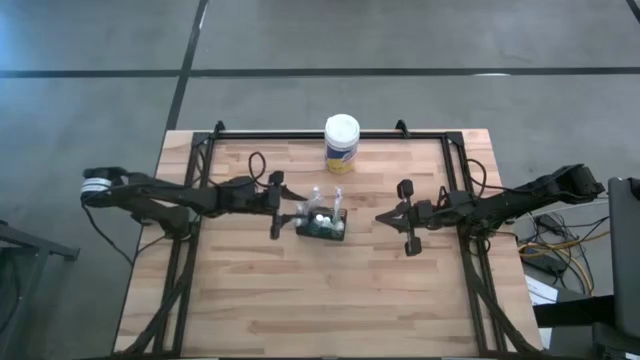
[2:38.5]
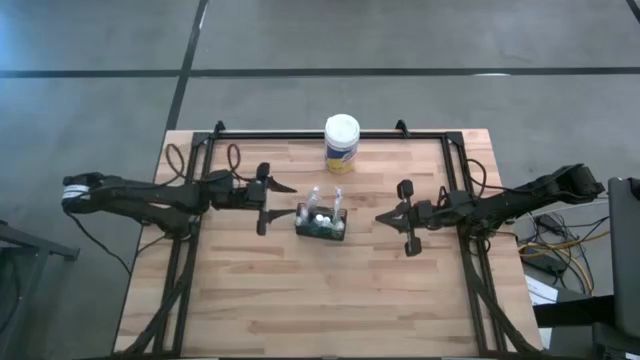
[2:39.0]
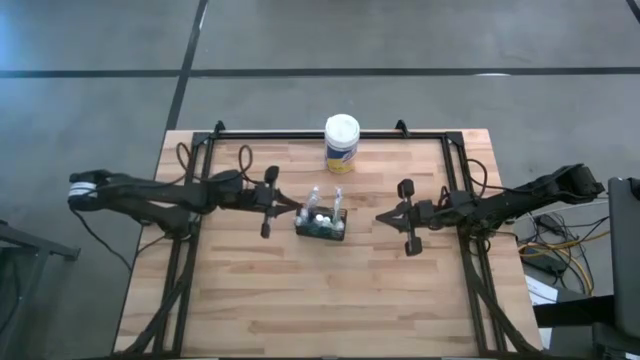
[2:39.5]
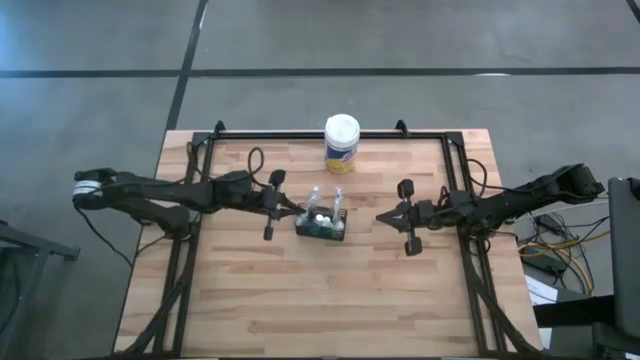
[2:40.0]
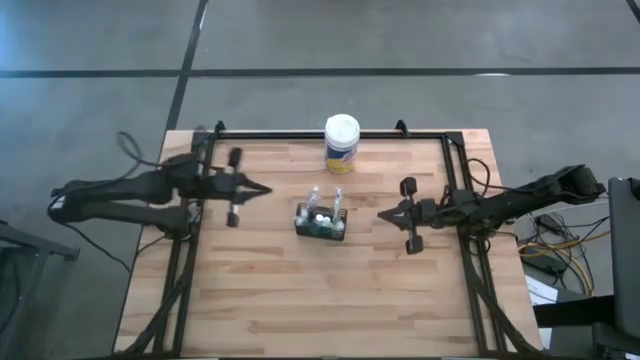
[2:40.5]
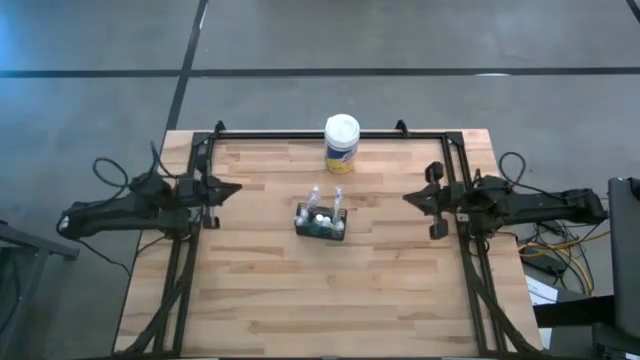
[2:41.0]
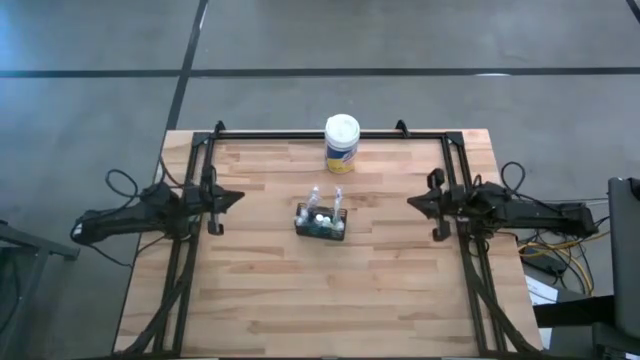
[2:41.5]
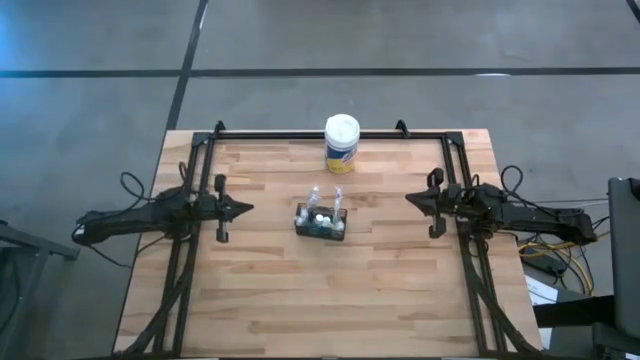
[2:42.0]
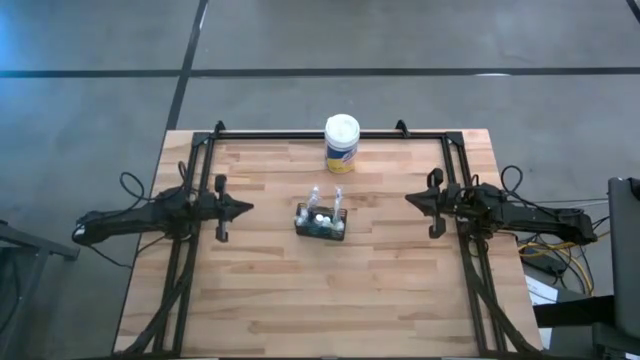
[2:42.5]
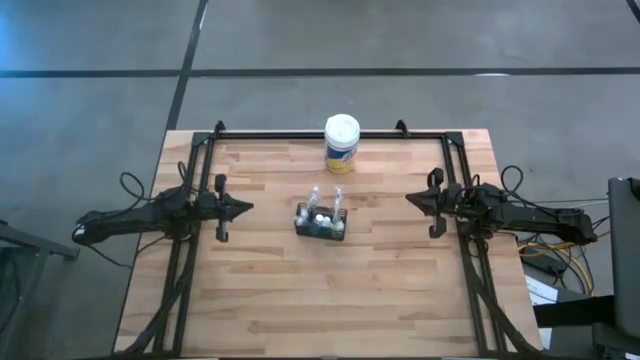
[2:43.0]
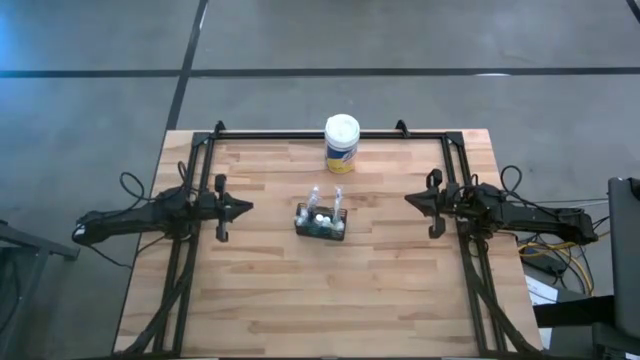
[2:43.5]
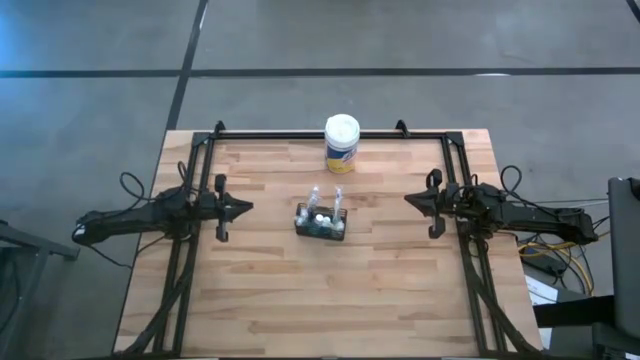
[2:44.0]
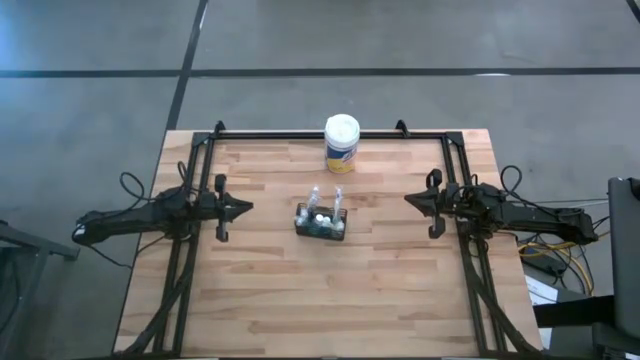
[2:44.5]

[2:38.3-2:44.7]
Task: Pick & Place toothbrushing station
Return to Home Position

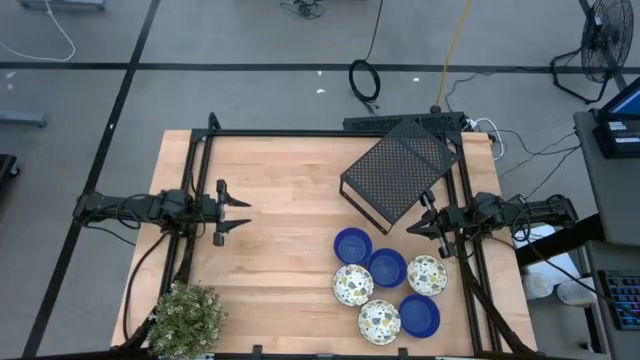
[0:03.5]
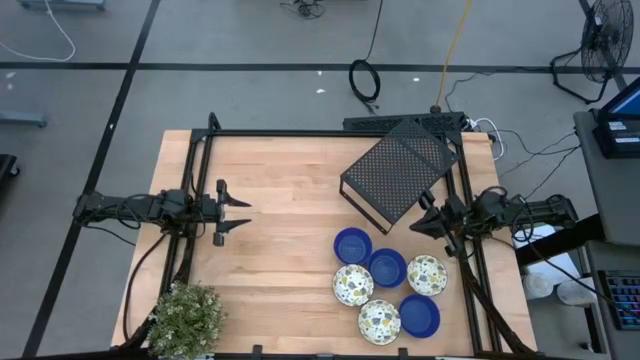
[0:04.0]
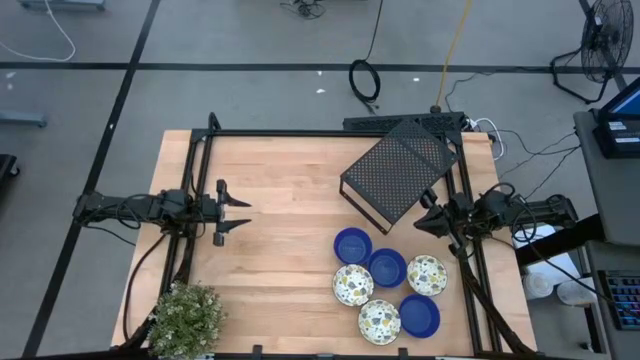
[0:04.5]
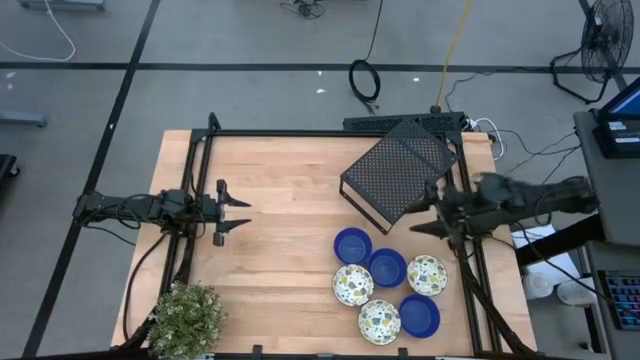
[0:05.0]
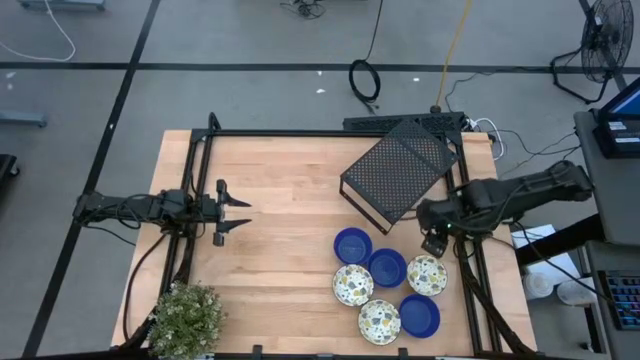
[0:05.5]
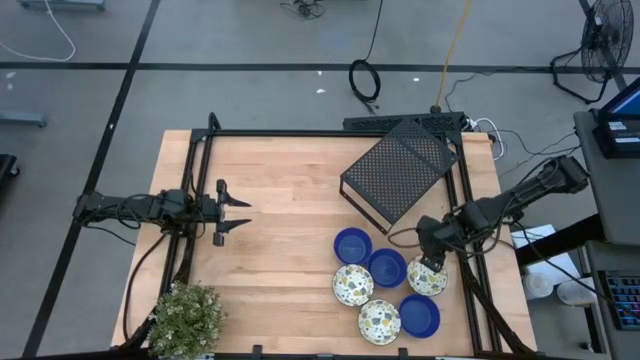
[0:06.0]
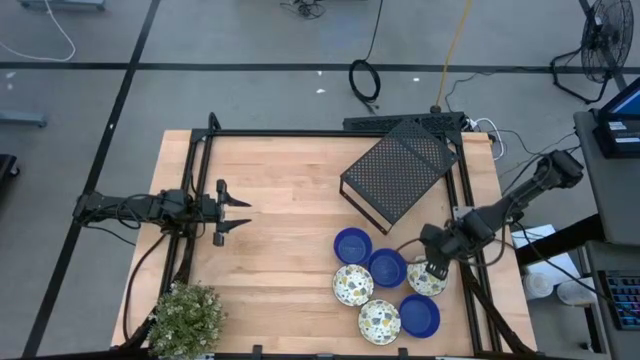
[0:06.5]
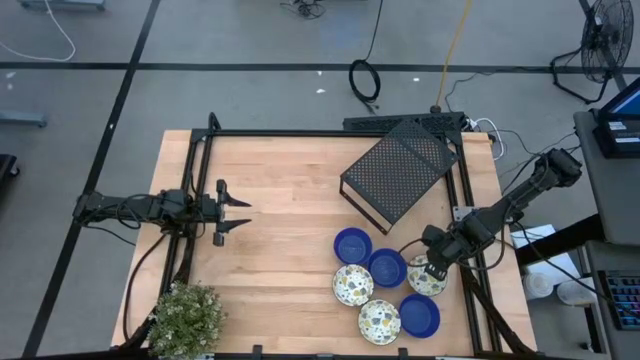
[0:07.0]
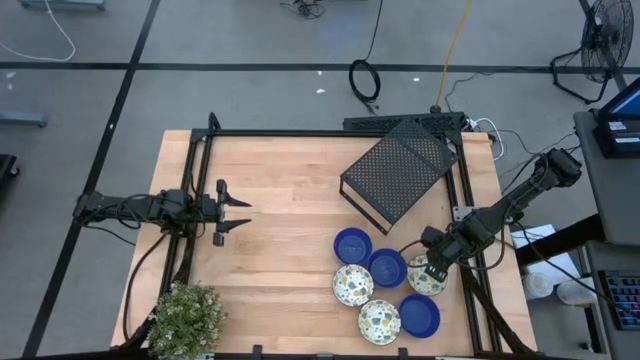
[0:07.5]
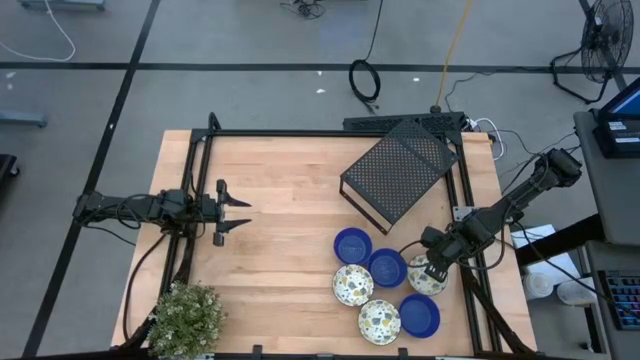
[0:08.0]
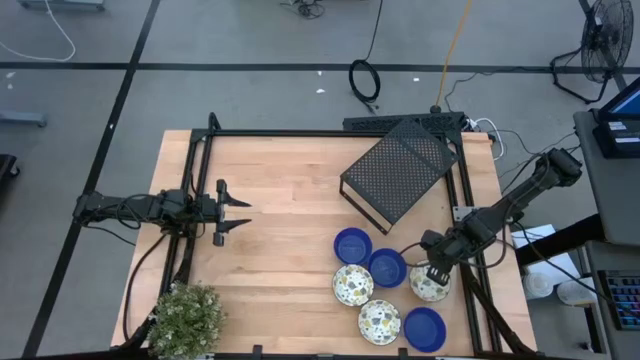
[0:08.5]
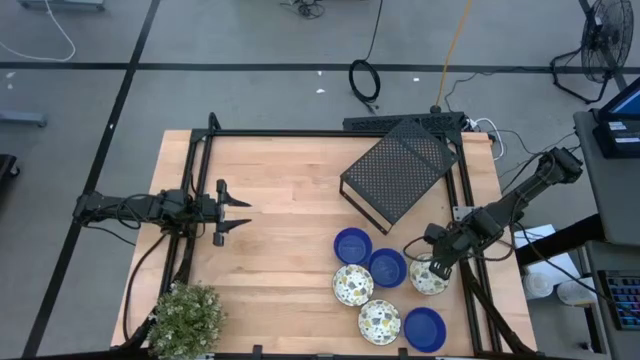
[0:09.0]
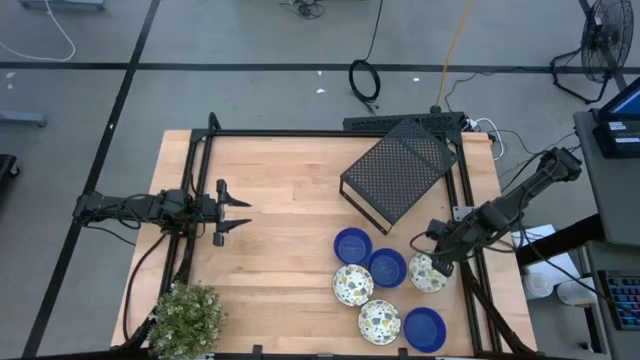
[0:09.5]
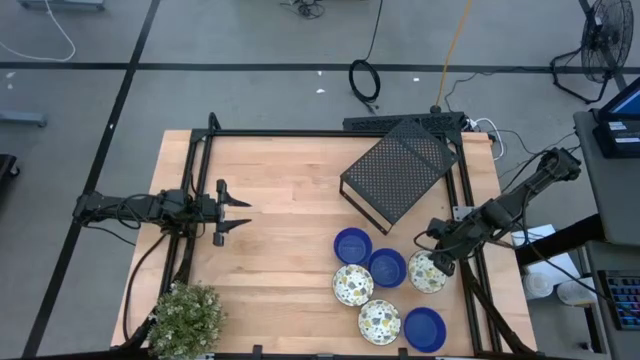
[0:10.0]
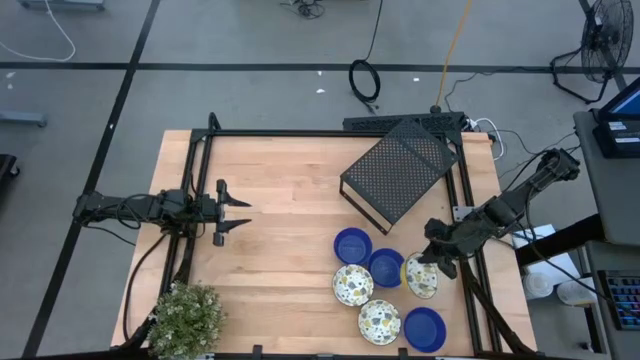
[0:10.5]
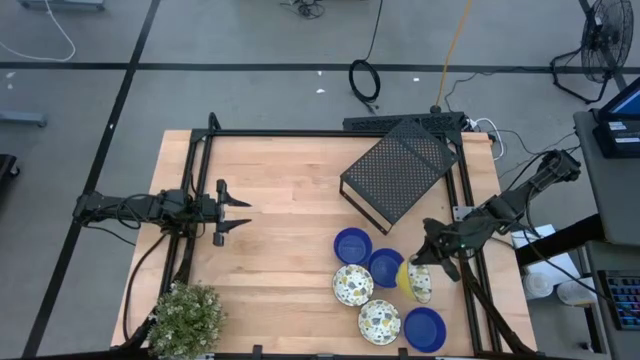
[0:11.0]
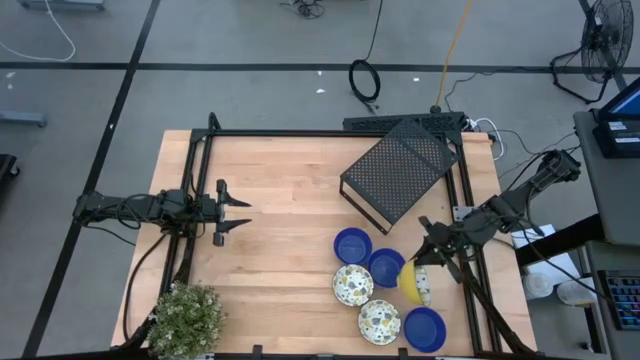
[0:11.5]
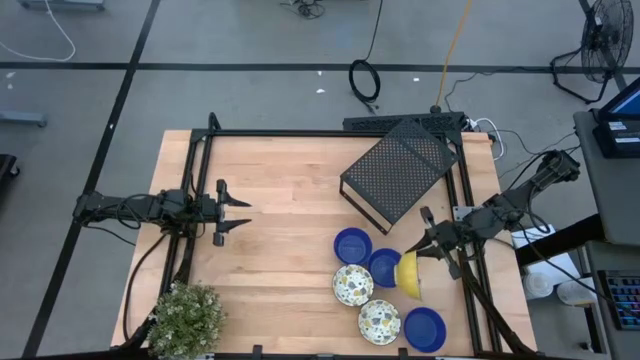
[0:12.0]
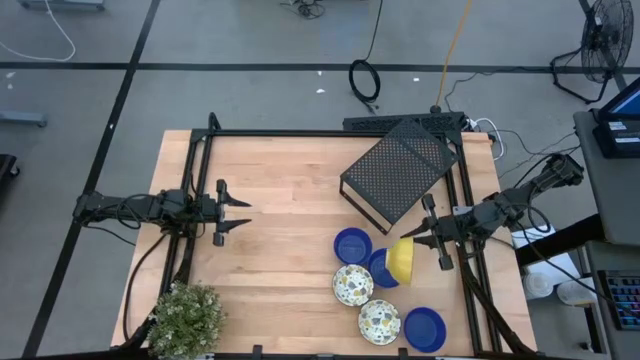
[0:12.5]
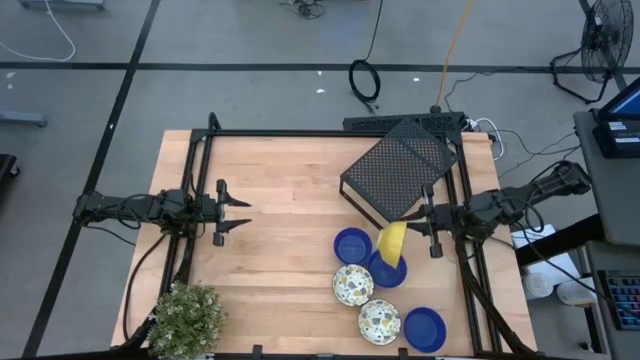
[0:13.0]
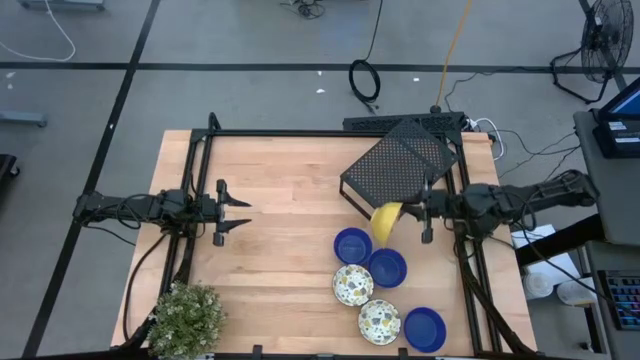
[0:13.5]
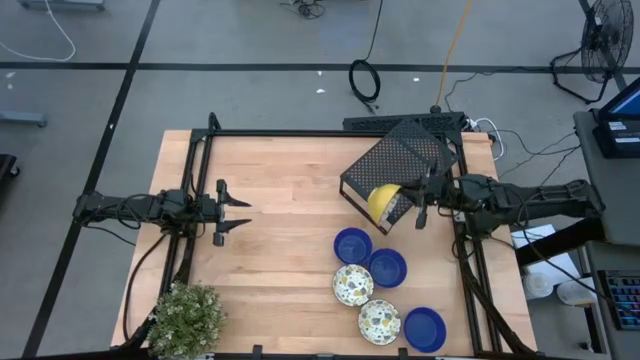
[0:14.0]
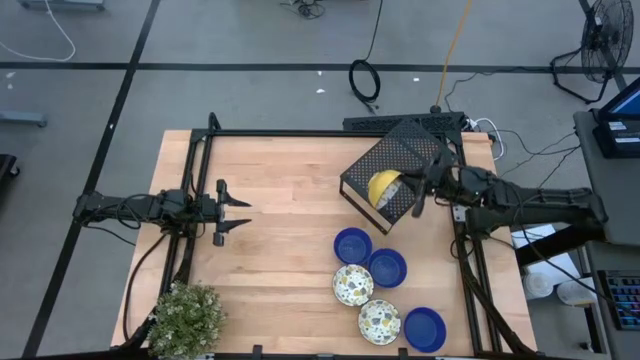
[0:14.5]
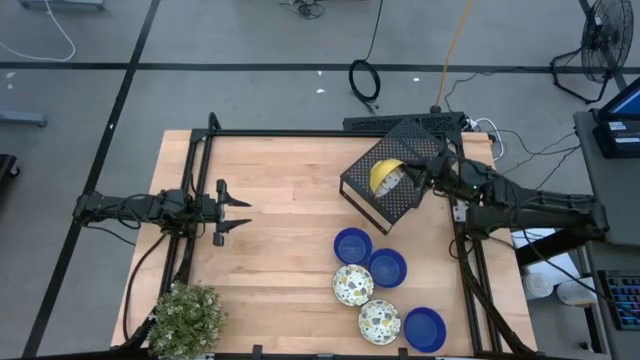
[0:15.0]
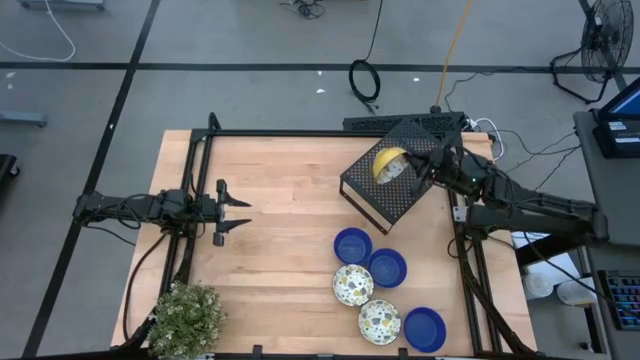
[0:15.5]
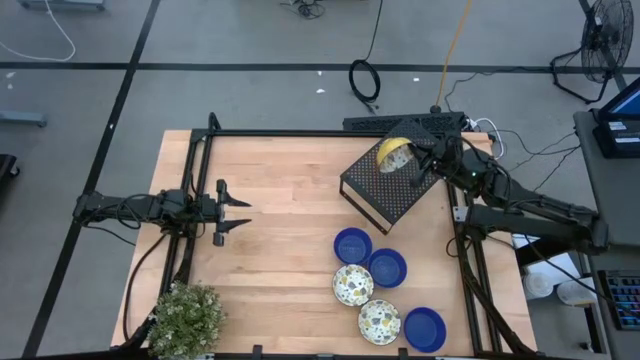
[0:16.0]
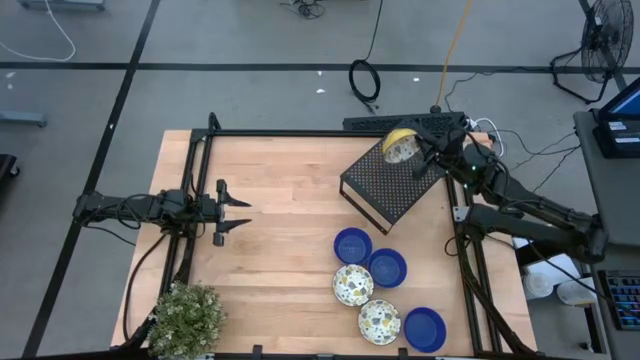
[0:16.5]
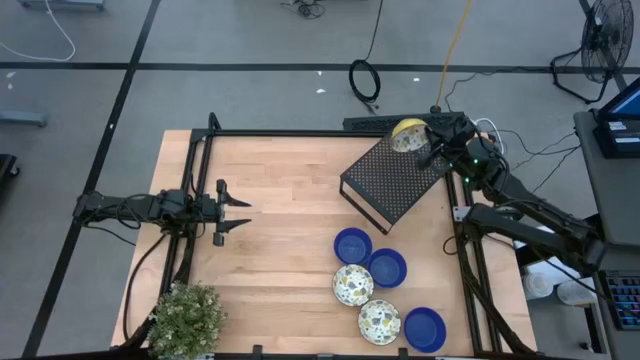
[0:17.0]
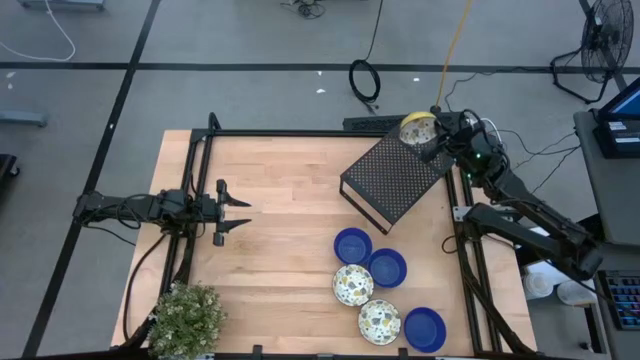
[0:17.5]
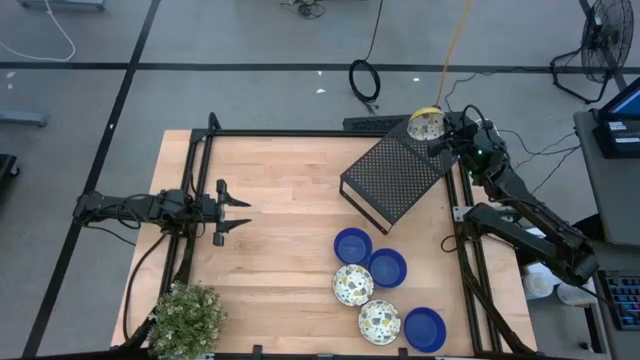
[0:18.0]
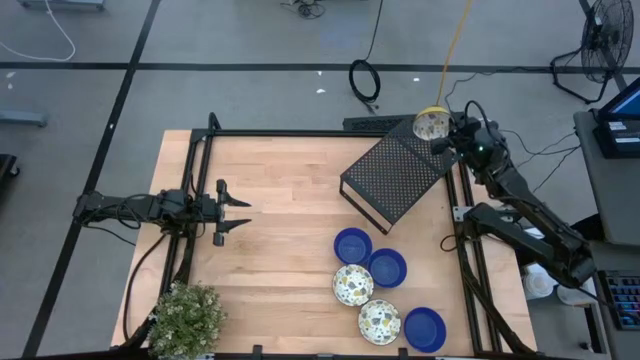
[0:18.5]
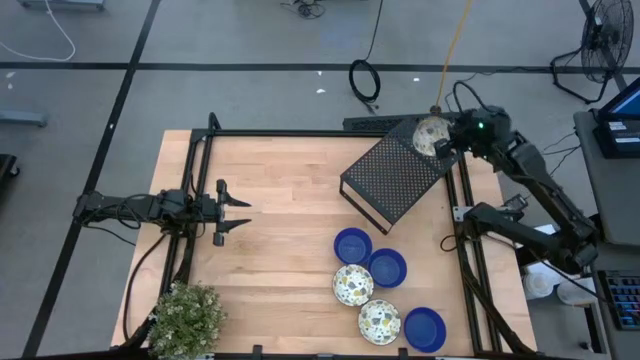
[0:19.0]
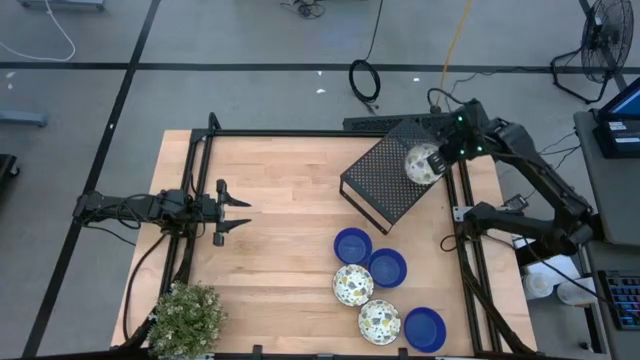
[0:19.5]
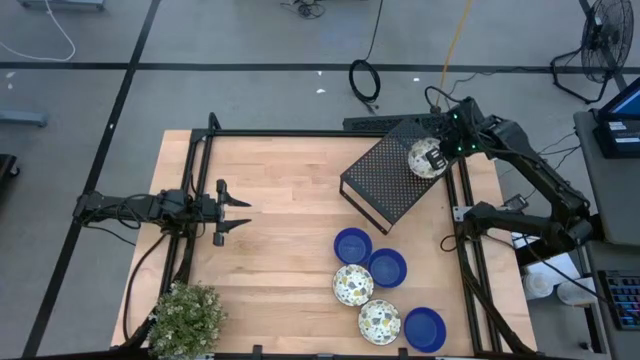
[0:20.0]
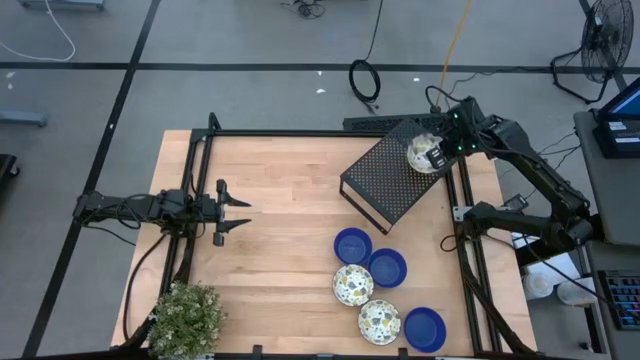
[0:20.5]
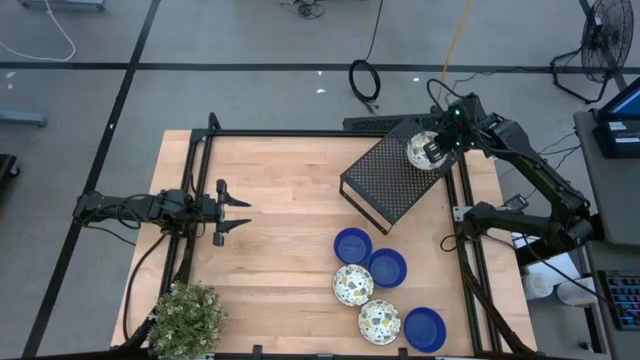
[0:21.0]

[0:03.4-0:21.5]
Task: Pick & Place Mini bowls
Put the top right patterned yellow bowl on the shelf
